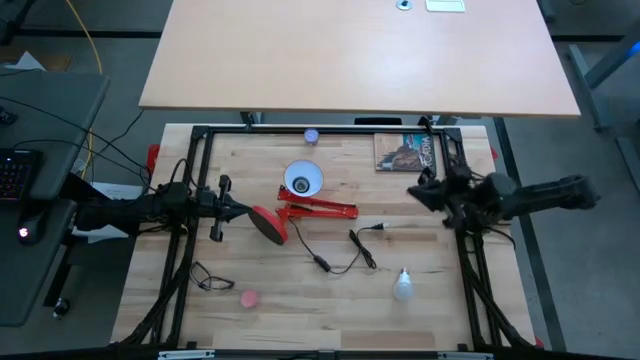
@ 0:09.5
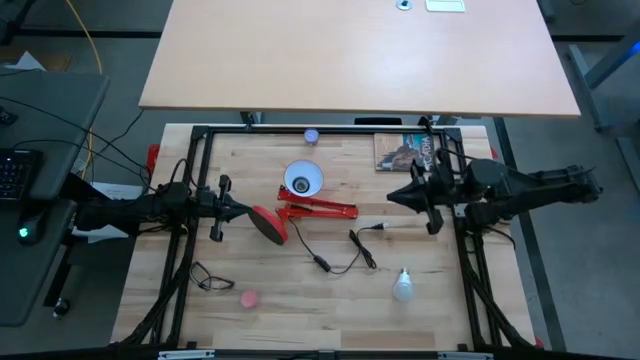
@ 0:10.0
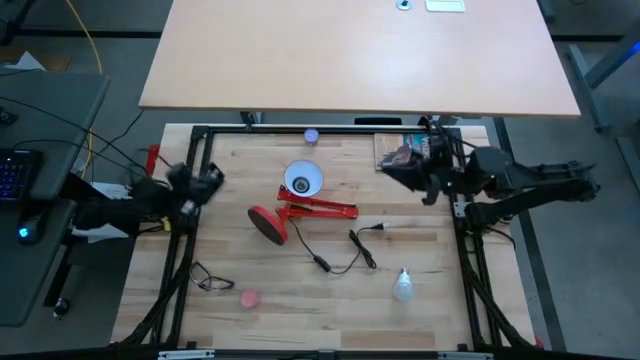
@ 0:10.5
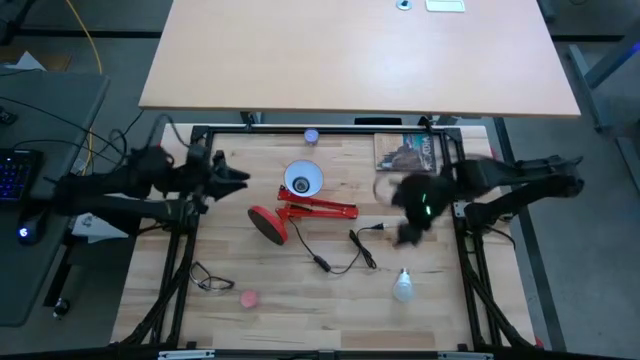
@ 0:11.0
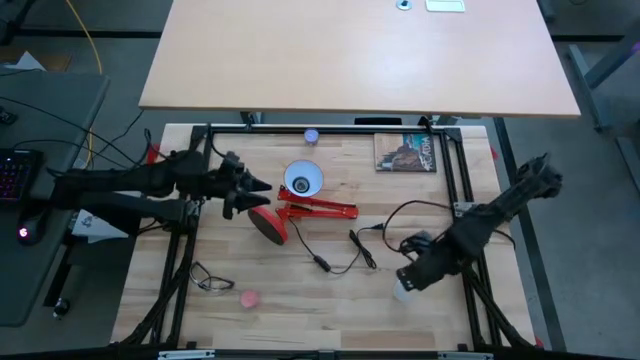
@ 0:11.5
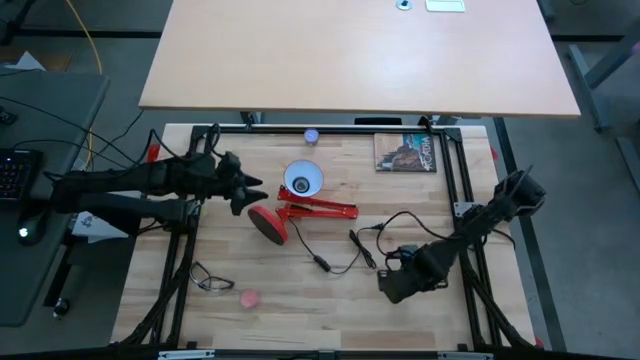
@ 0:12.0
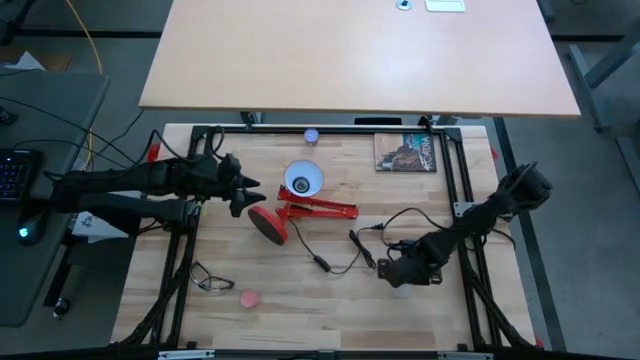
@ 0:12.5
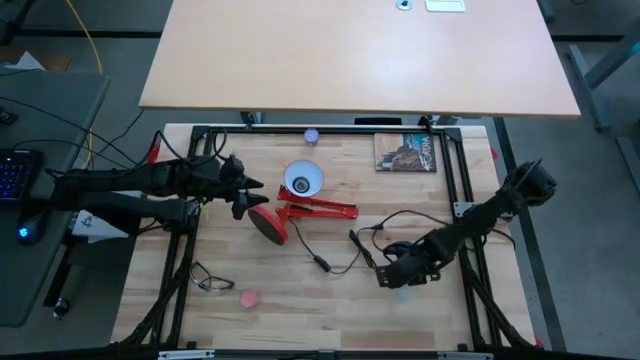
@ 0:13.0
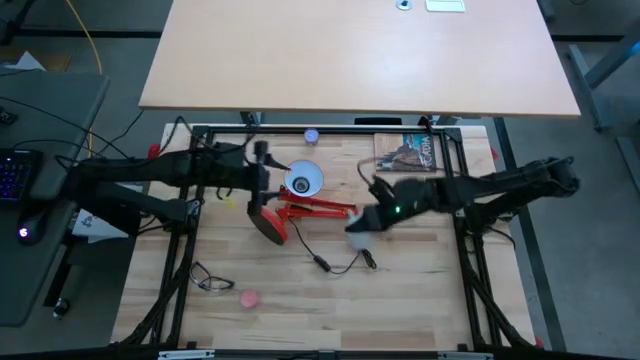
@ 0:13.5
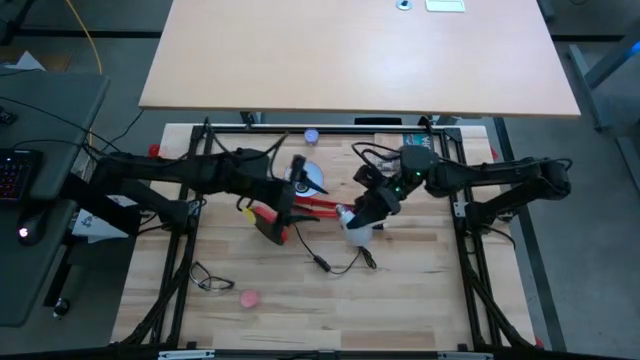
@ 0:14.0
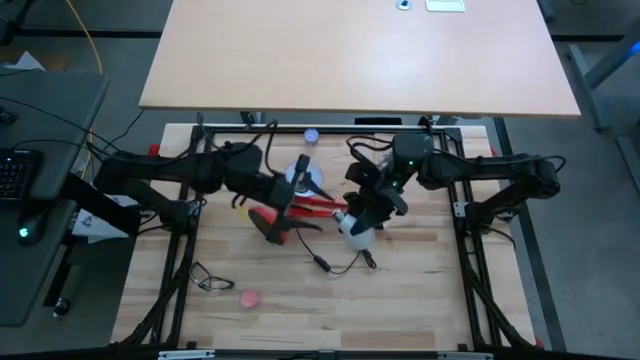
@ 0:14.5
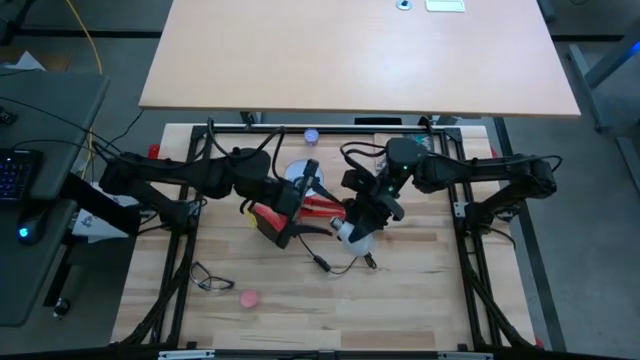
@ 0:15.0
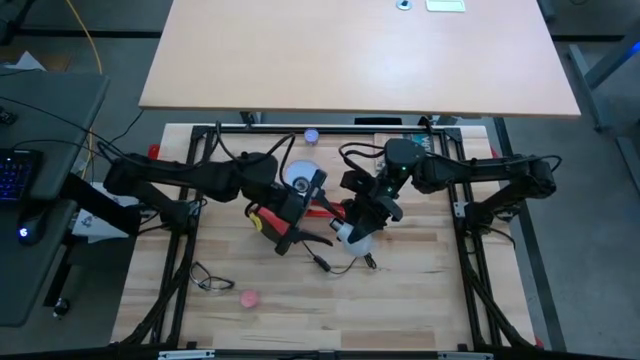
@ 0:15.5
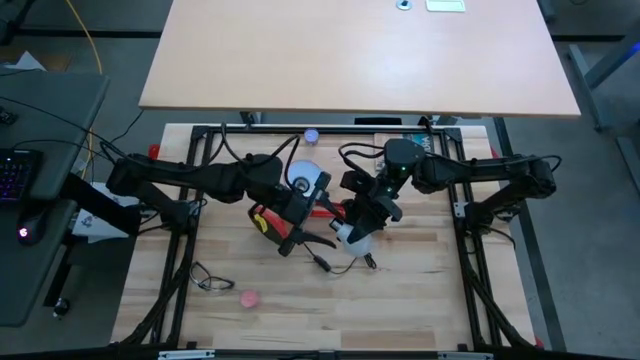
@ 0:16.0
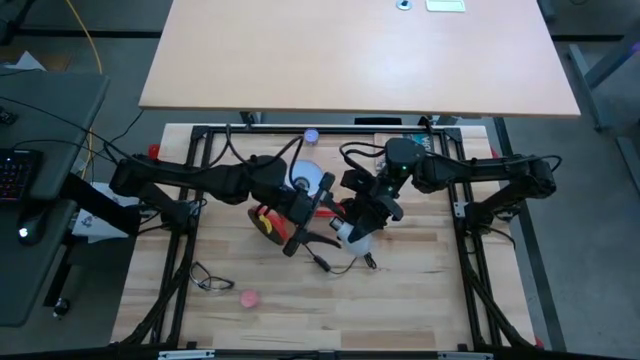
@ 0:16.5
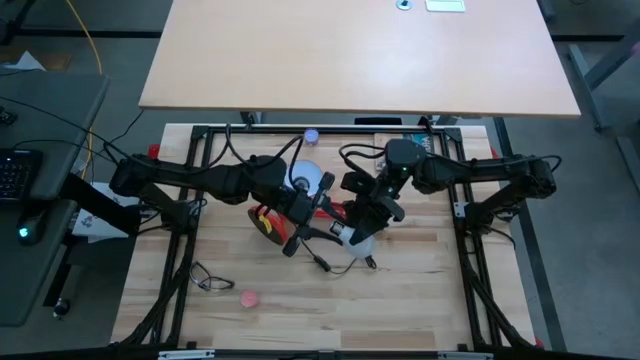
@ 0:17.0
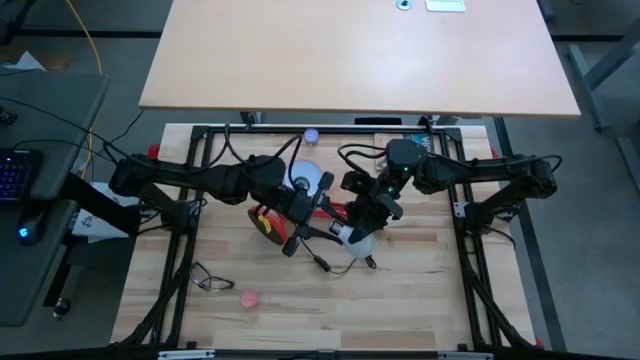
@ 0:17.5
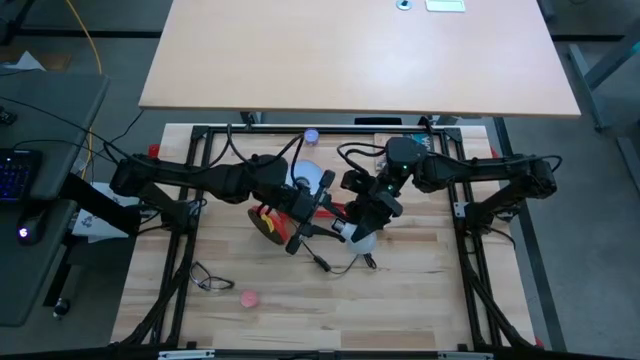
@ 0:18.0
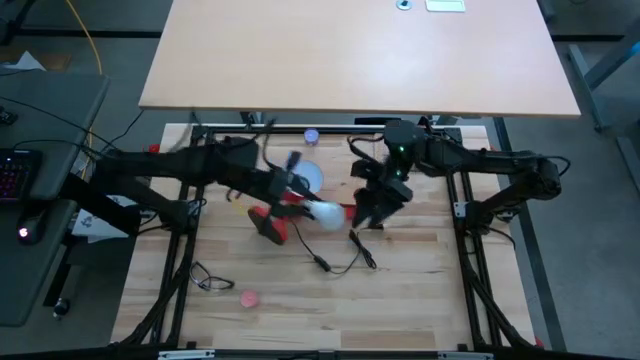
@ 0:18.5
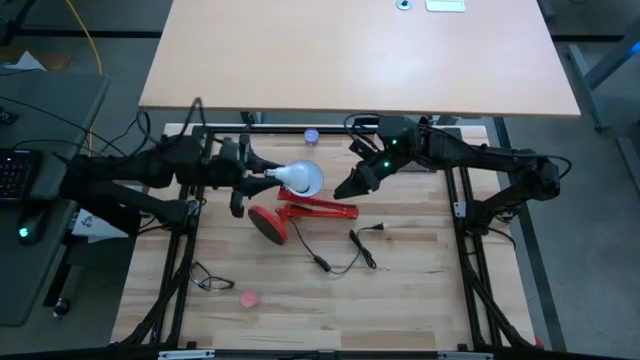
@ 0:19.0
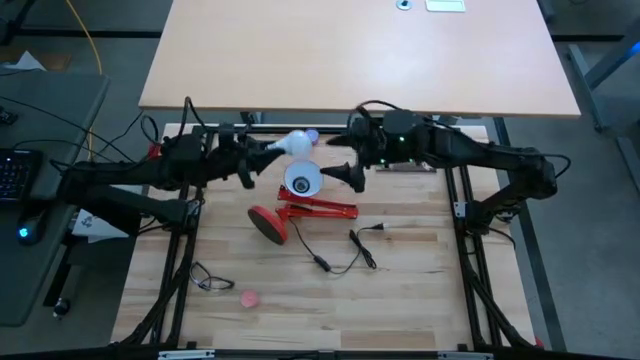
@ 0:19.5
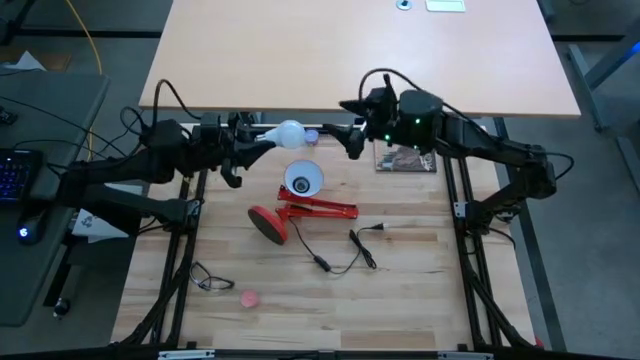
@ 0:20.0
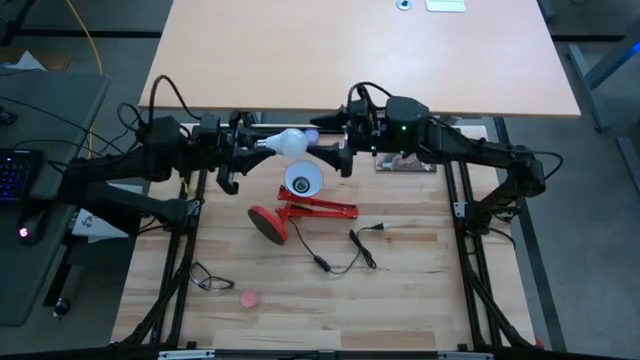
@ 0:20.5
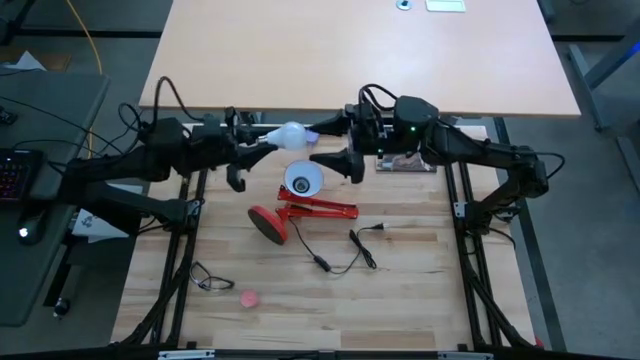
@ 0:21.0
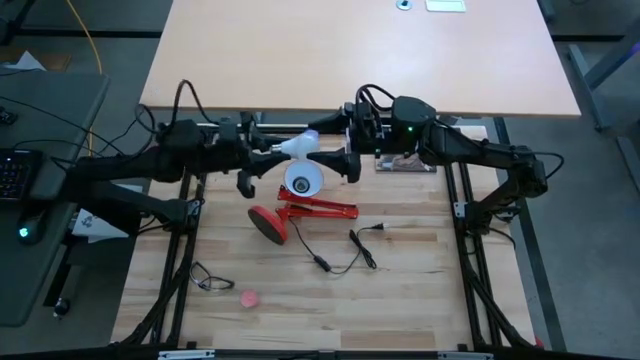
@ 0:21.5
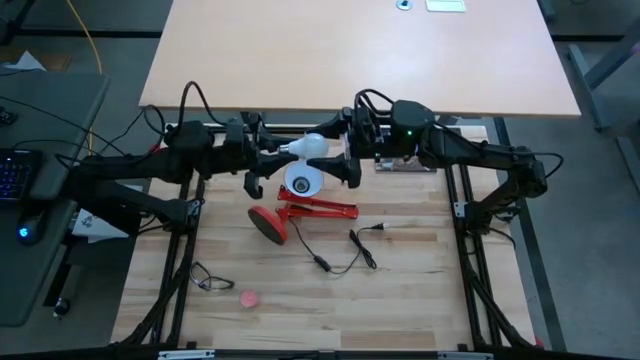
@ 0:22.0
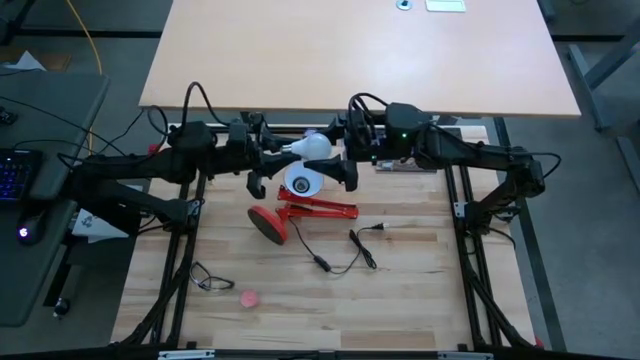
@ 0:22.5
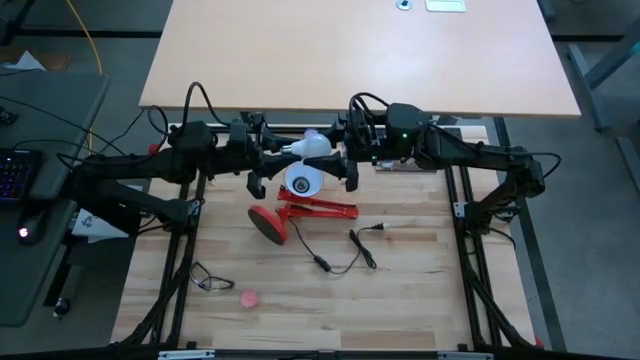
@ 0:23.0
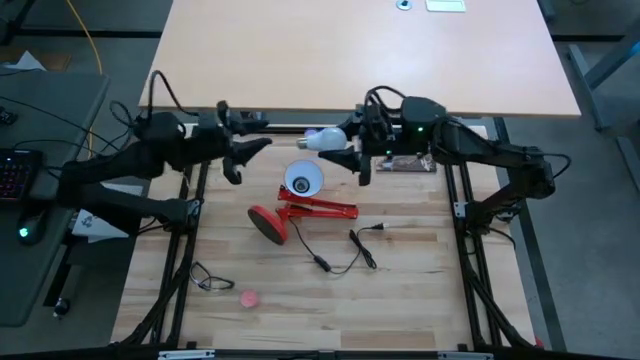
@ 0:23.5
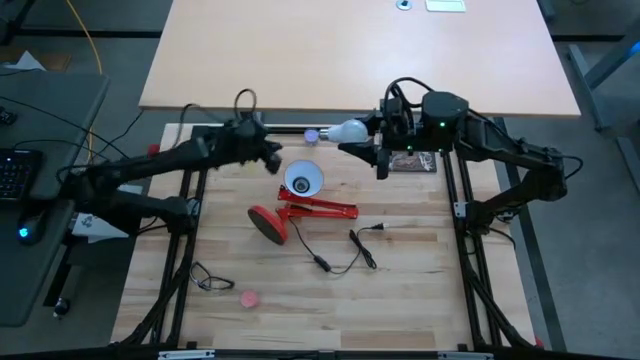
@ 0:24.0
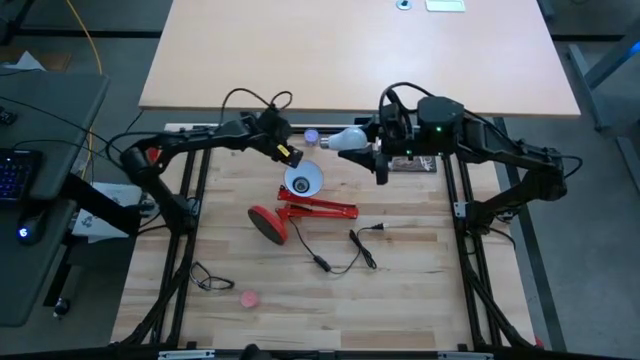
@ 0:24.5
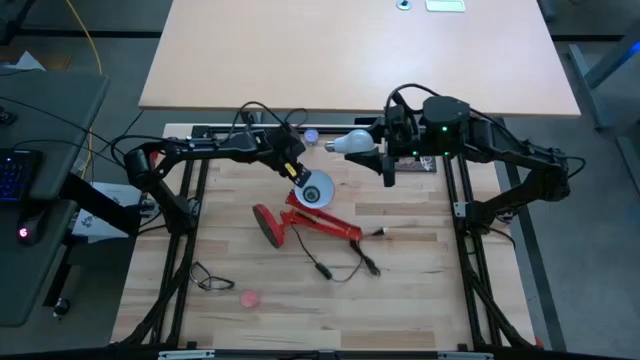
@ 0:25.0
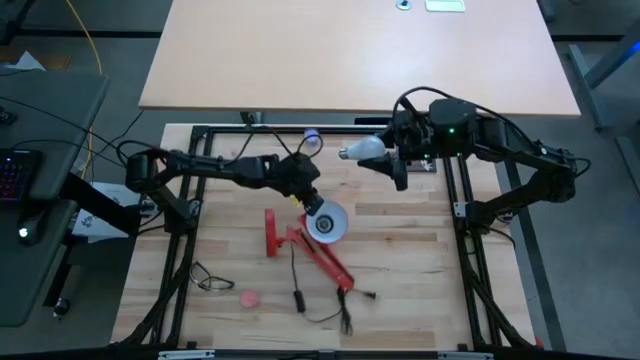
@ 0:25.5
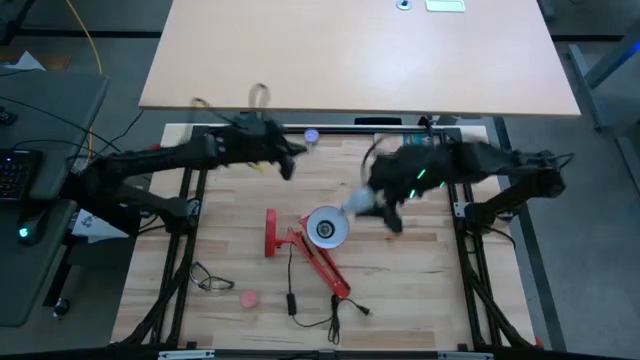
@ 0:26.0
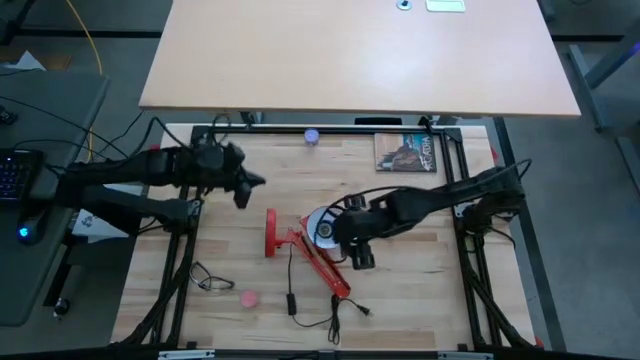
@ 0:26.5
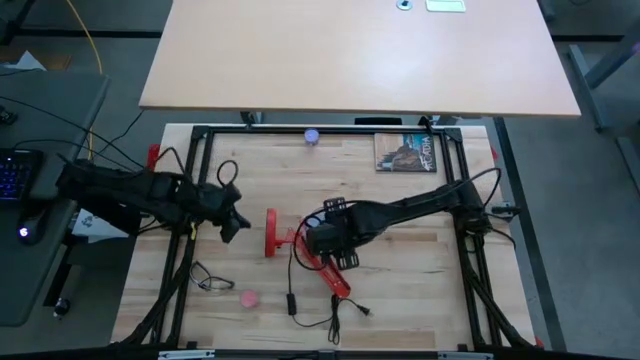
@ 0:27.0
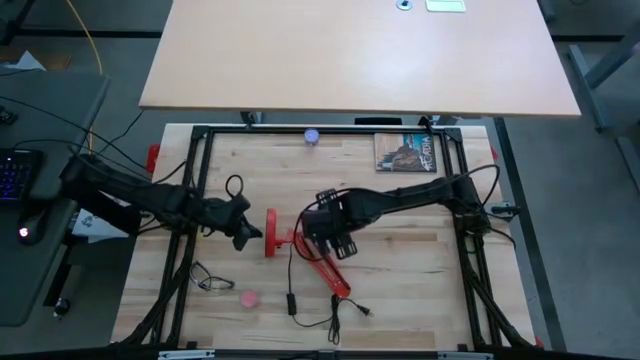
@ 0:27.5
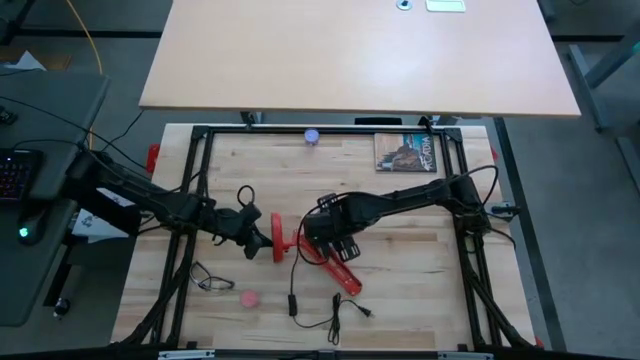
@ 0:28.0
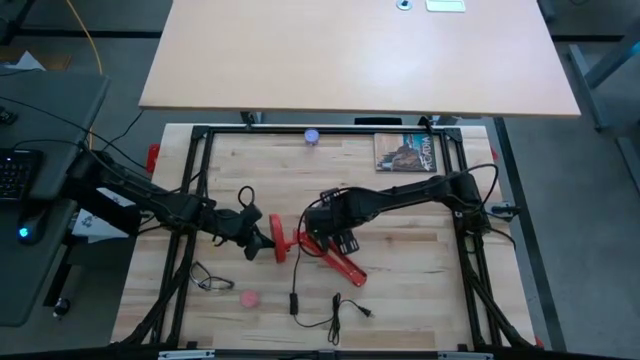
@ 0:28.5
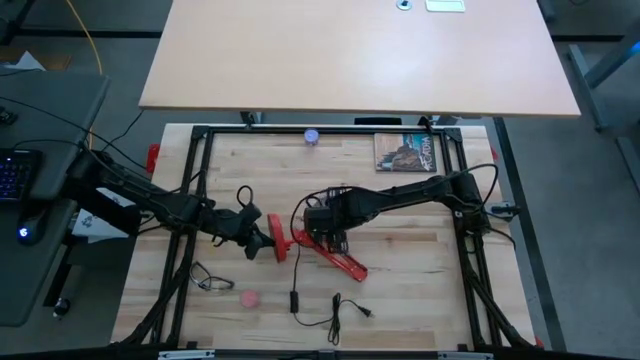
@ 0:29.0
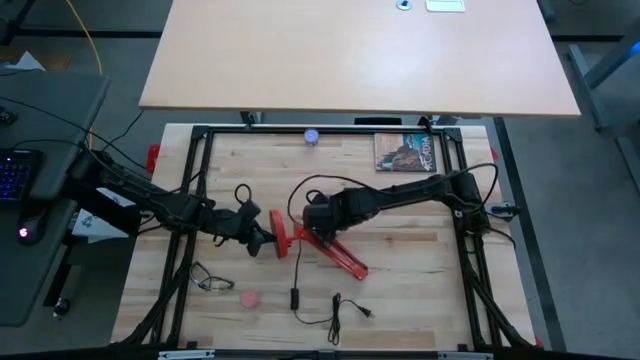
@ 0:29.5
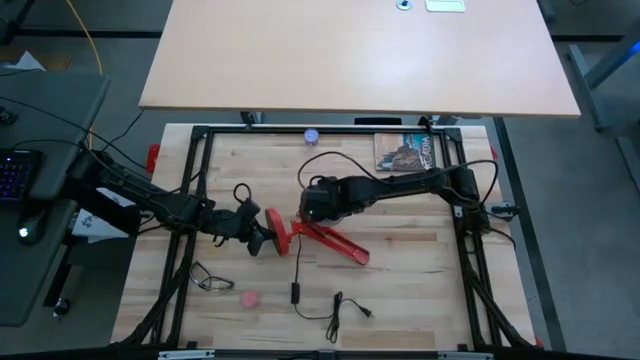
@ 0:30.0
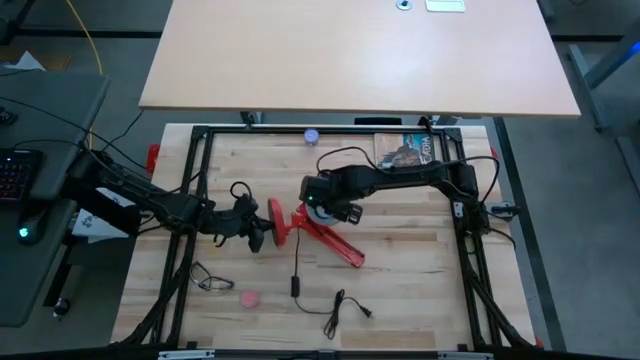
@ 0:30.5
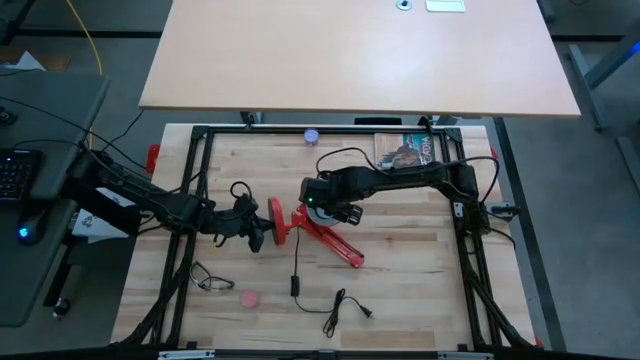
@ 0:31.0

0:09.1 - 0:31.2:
Task: Screw lightbulb
Insert the lightbulb into the desk lamp
